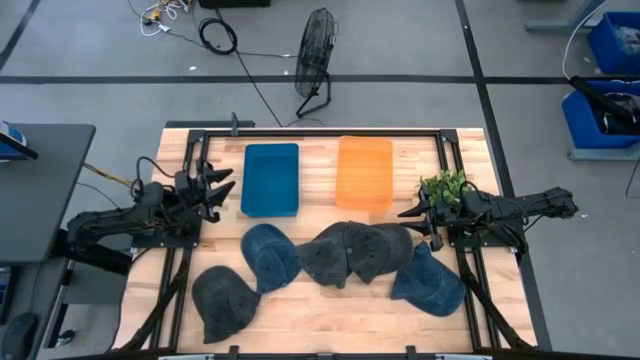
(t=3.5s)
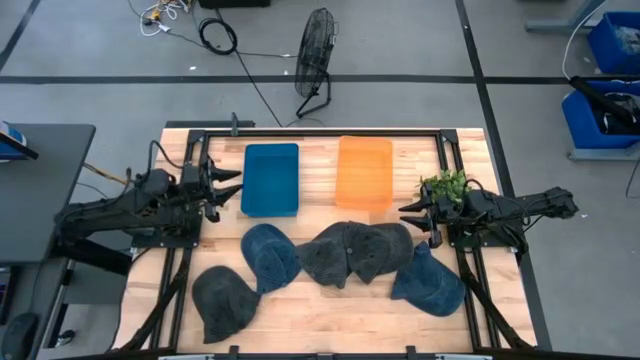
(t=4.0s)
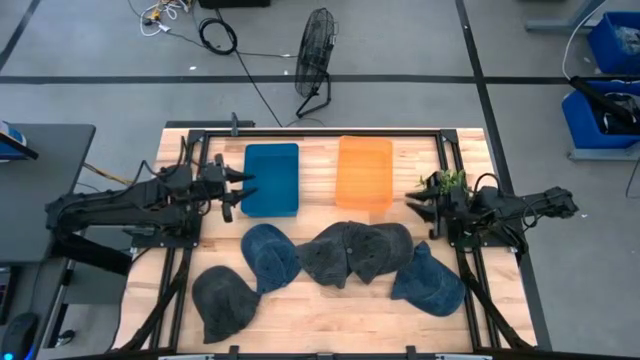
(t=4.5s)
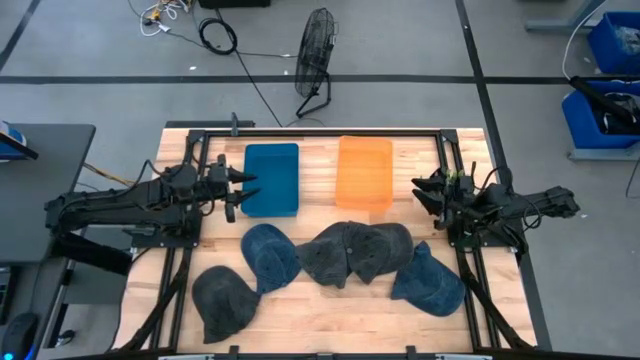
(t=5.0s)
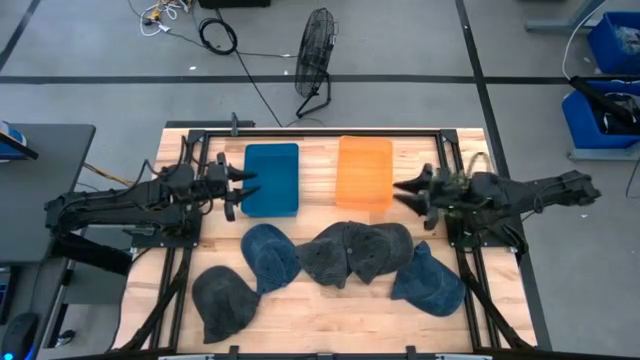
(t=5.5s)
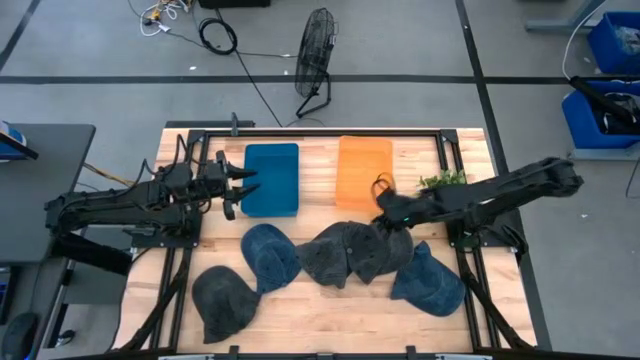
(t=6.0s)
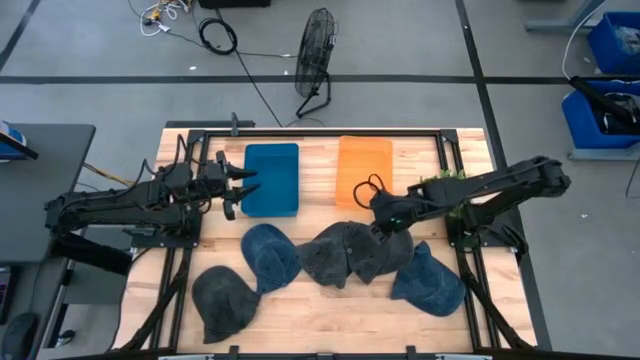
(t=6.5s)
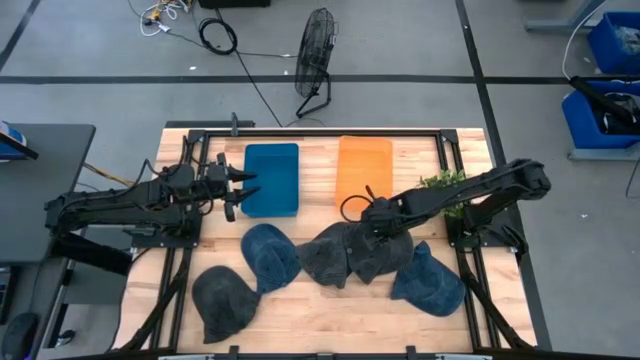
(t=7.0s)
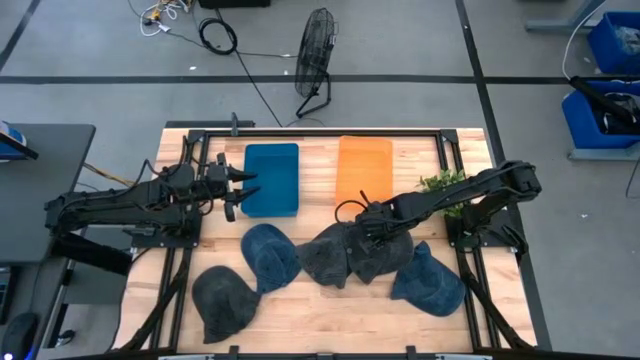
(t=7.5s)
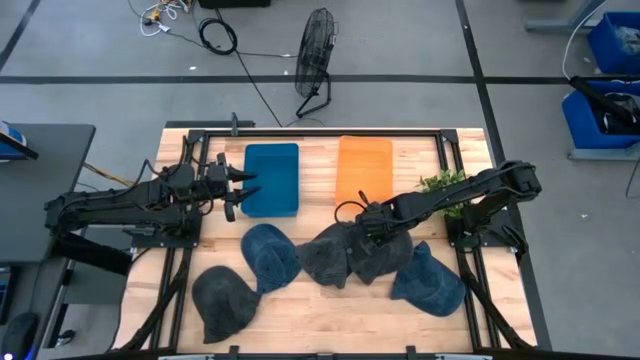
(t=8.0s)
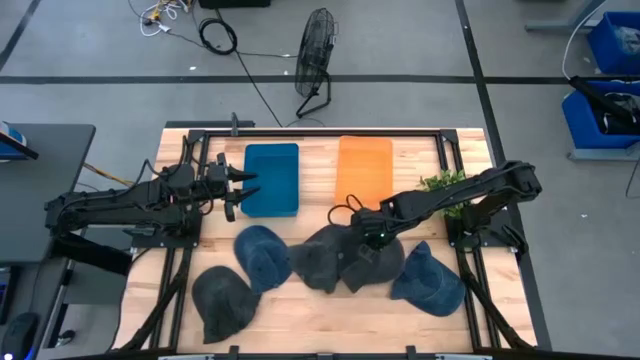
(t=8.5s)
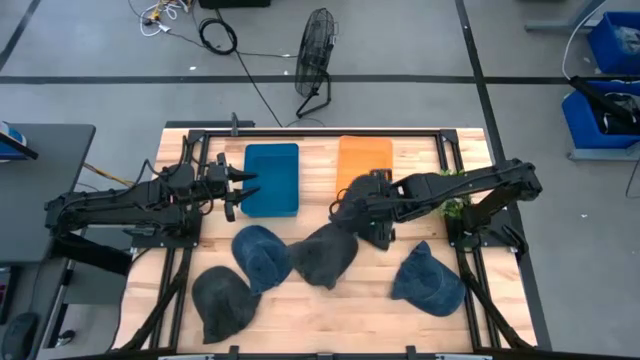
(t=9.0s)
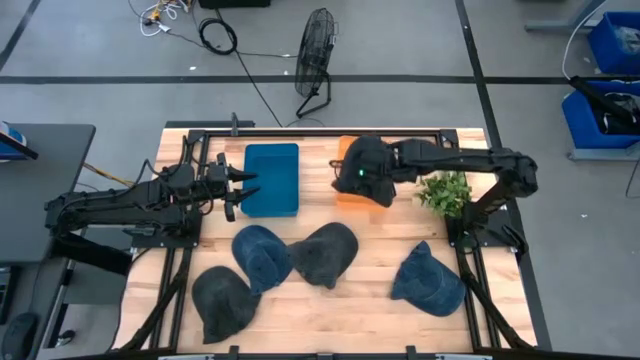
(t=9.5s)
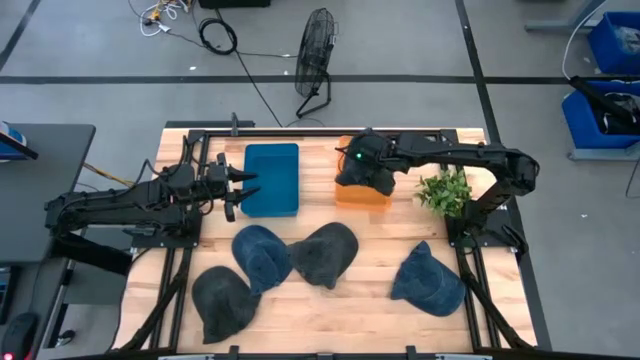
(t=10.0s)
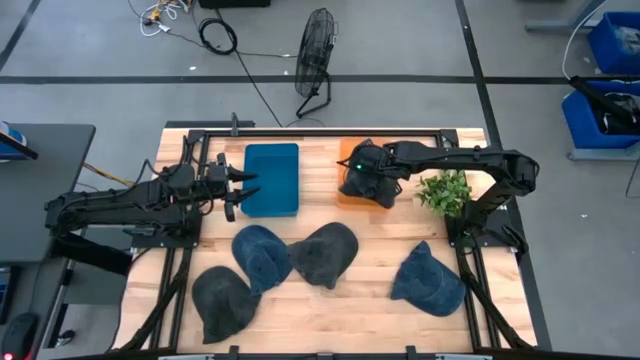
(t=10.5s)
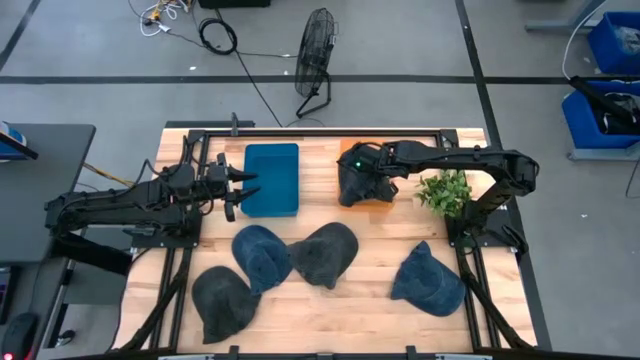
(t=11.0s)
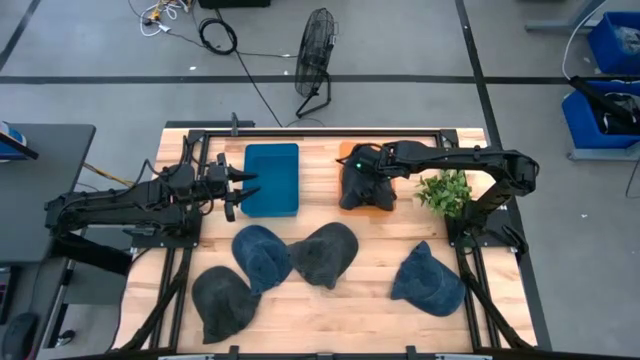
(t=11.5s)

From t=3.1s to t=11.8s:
Task: Pick & Place hat
Put the right gray cap into the orange bin

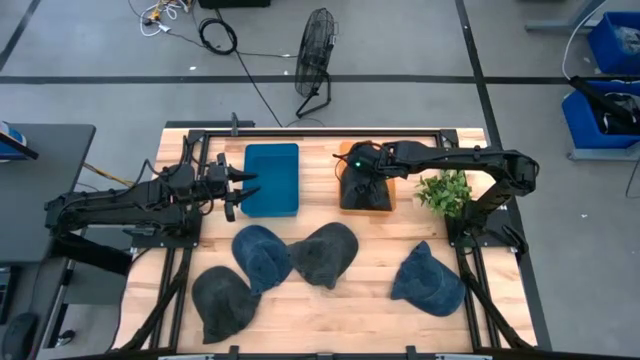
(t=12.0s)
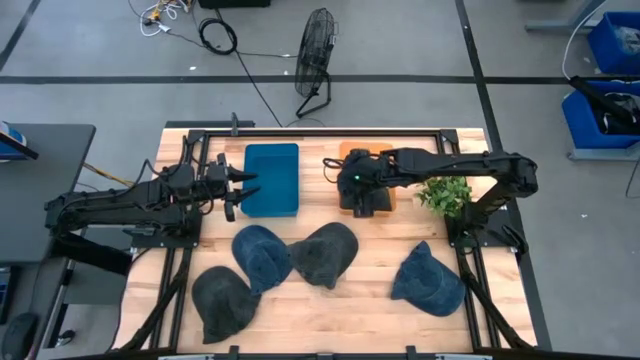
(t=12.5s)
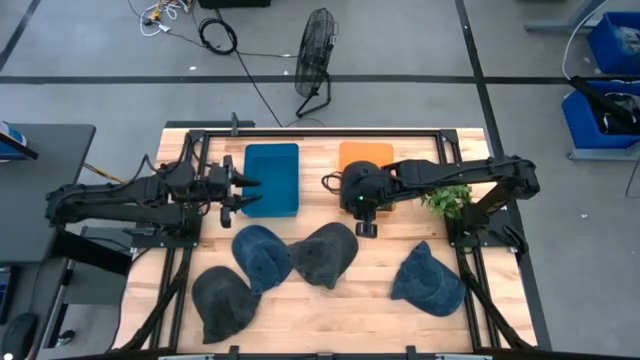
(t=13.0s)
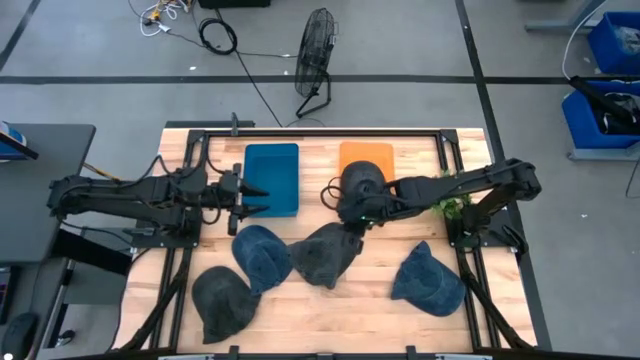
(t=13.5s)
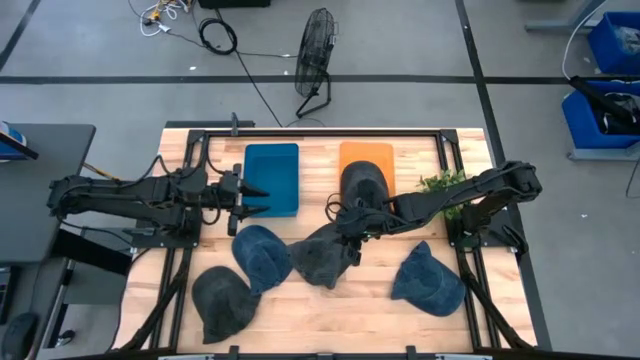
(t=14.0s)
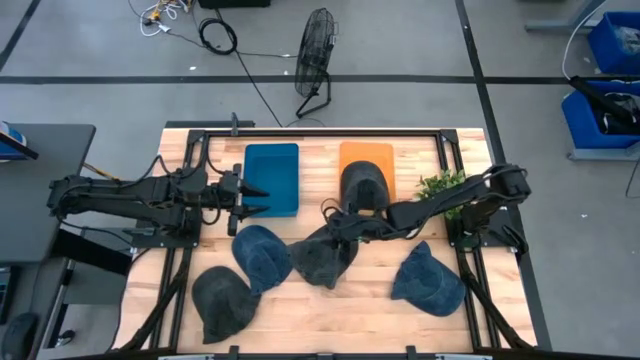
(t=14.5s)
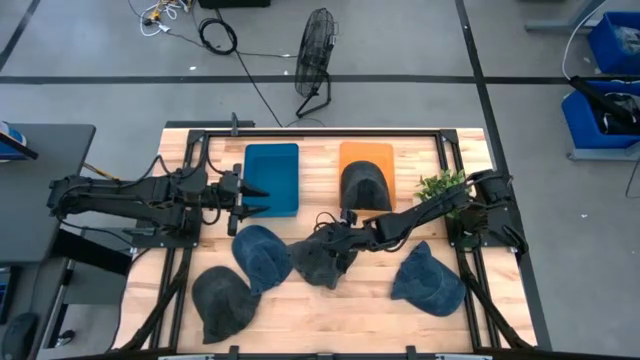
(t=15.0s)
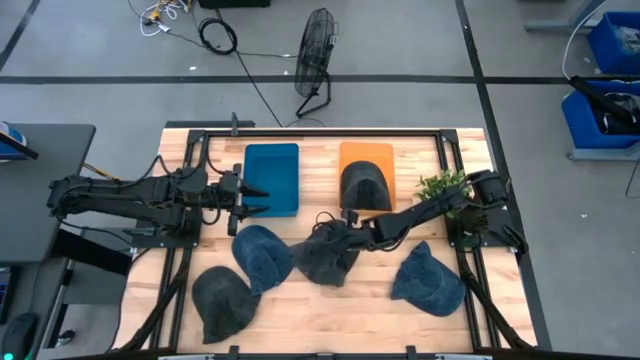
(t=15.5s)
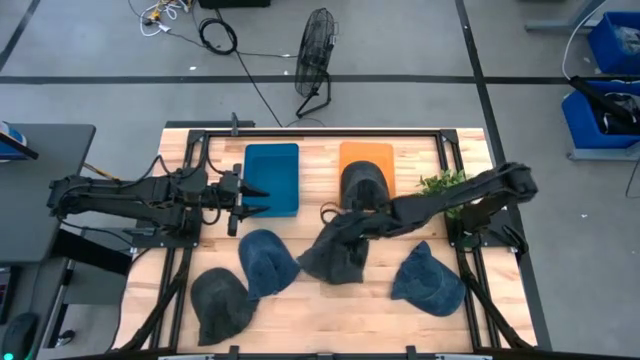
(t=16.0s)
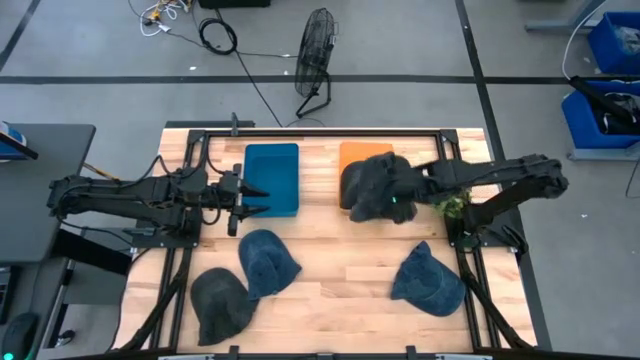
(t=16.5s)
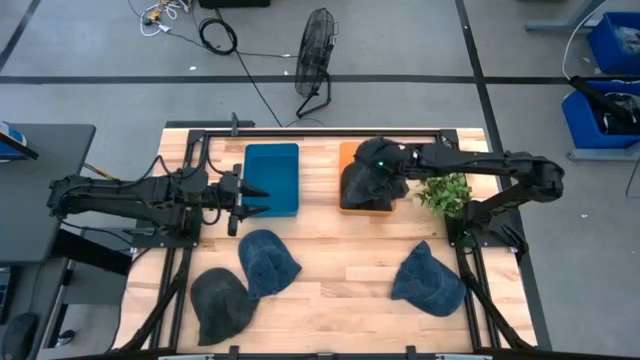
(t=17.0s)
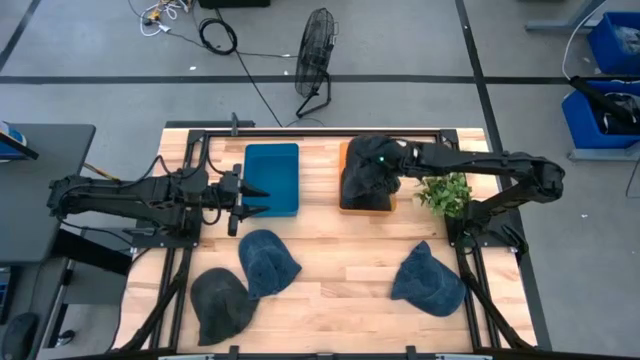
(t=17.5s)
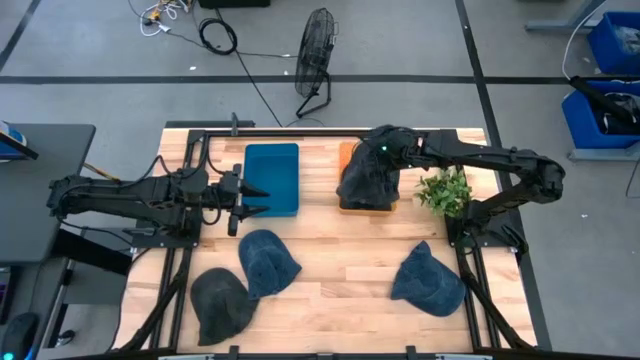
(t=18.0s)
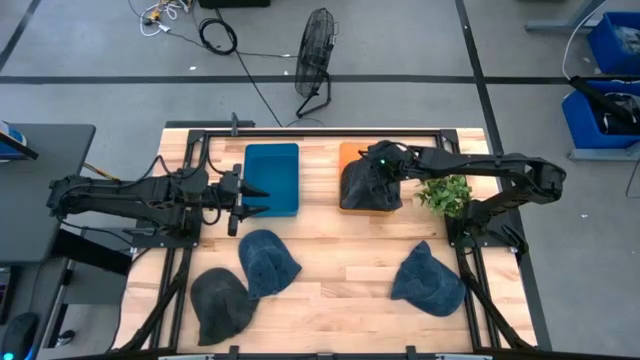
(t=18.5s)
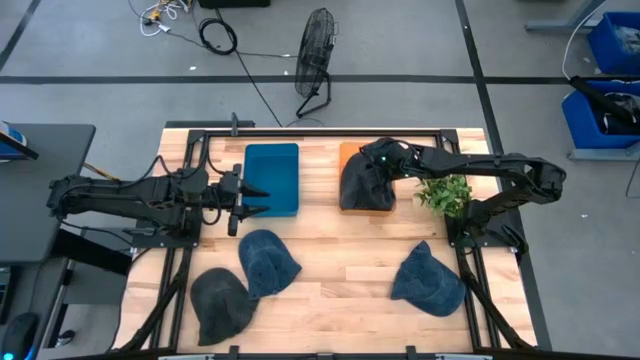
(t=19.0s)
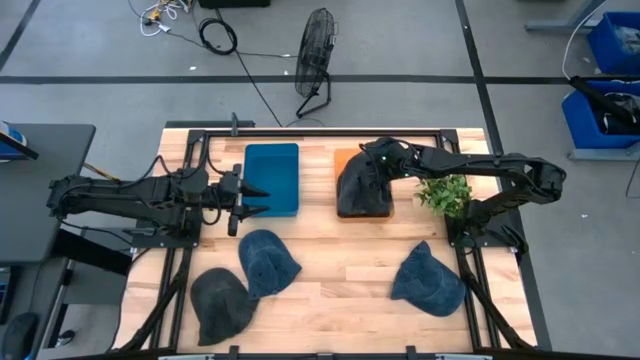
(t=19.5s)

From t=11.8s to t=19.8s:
Put the right gray cap into the orange bin

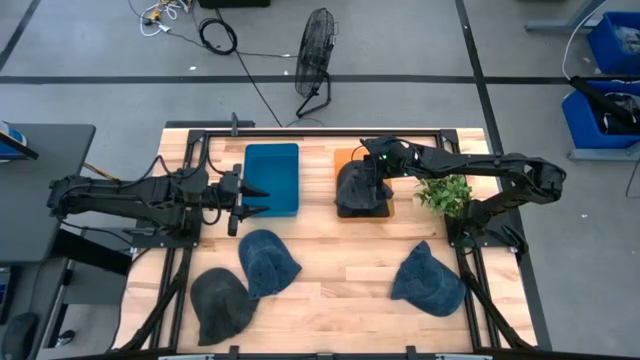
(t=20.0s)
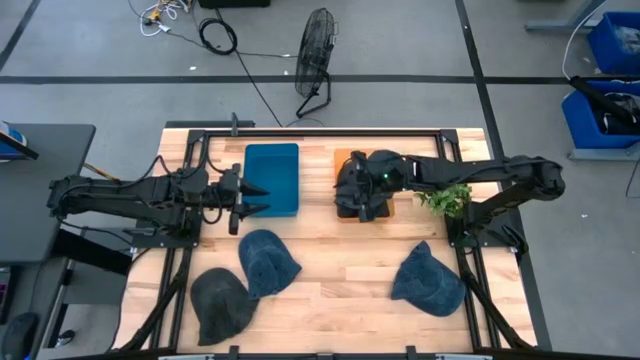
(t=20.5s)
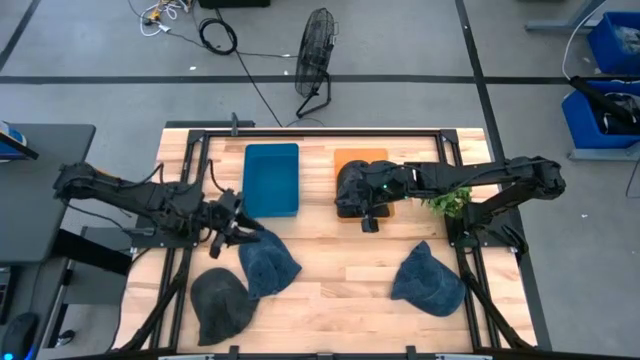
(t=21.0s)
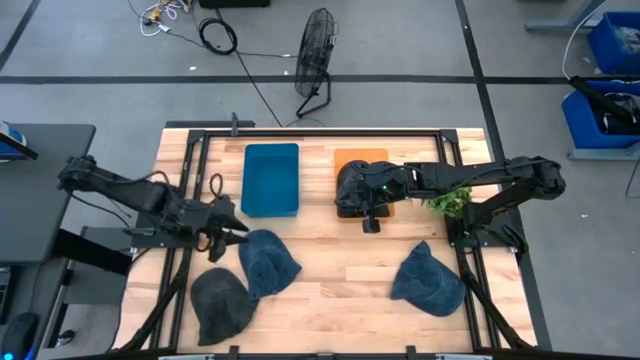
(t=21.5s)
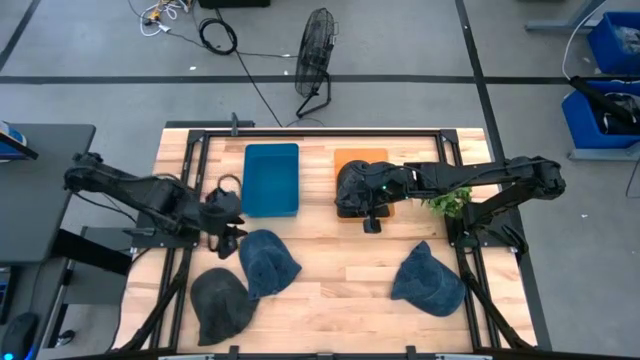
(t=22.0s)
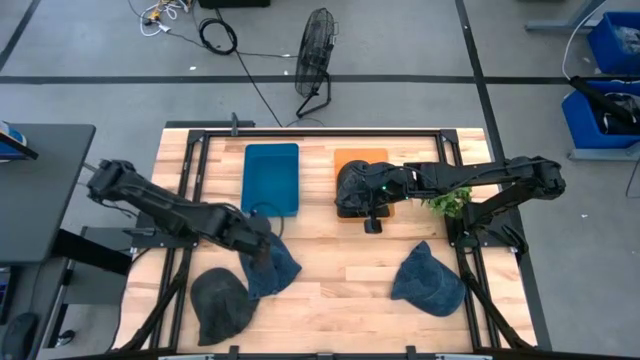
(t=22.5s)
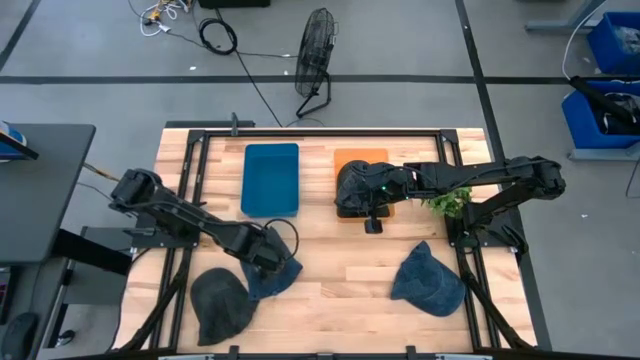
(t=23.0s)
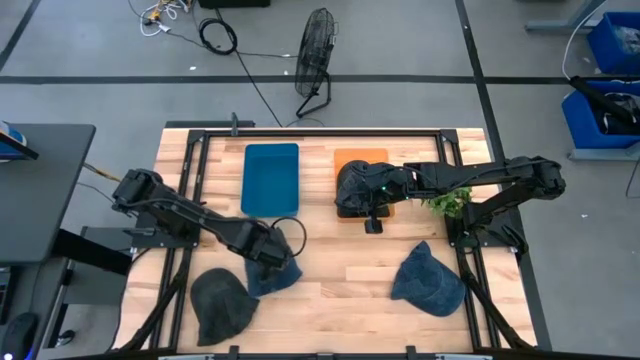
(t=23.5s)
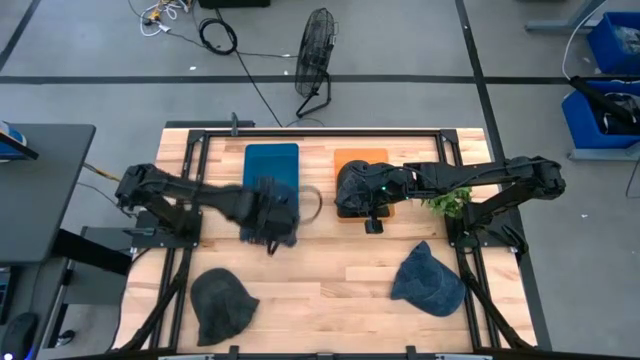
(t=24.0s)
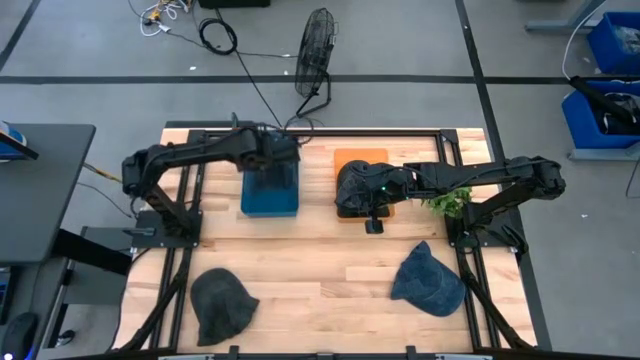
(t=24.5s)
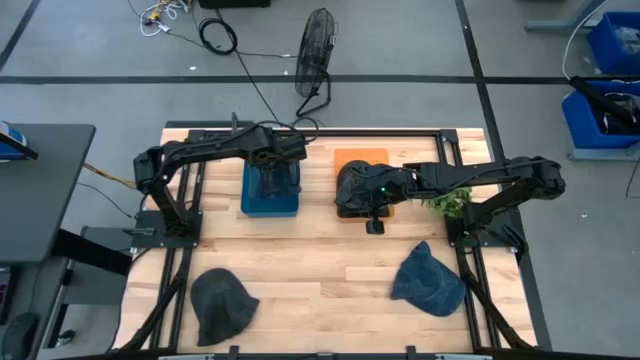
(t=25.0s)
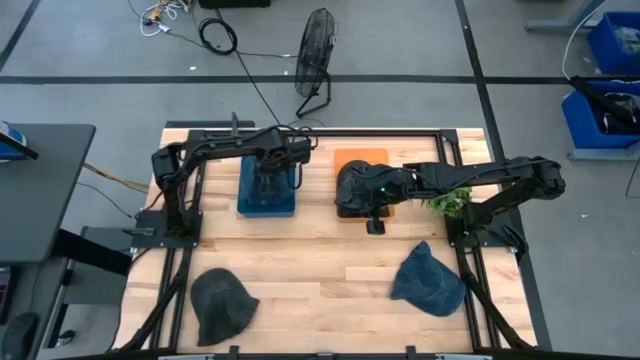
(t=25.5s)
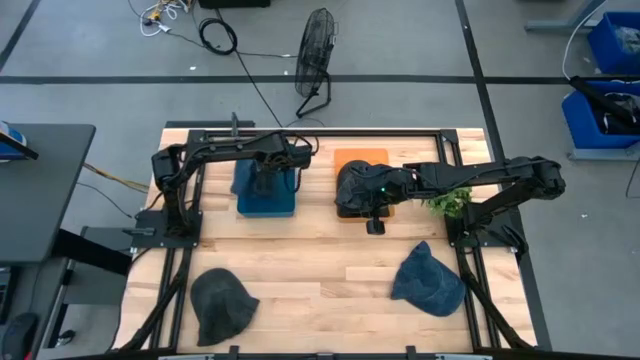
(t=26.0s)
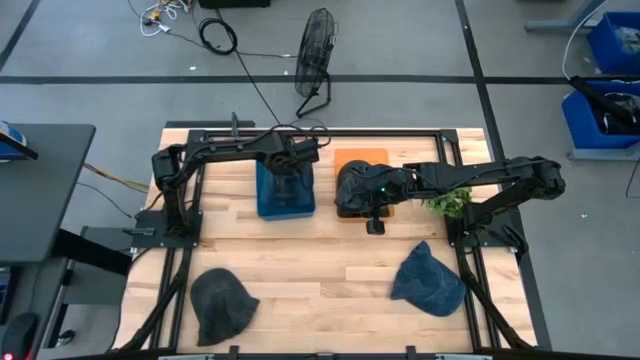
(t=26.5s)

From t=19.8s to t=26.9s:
Put the left blue cap into the blue bin
